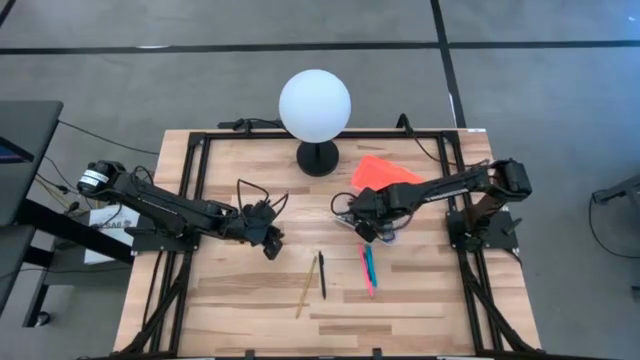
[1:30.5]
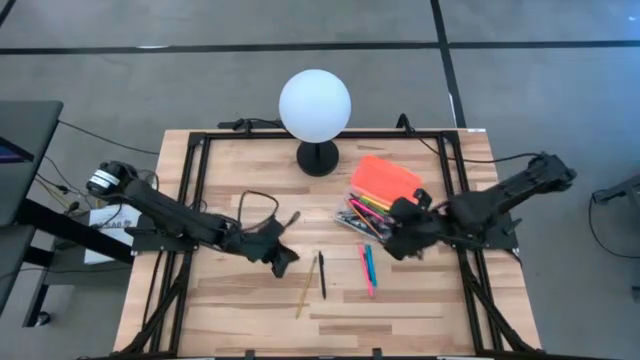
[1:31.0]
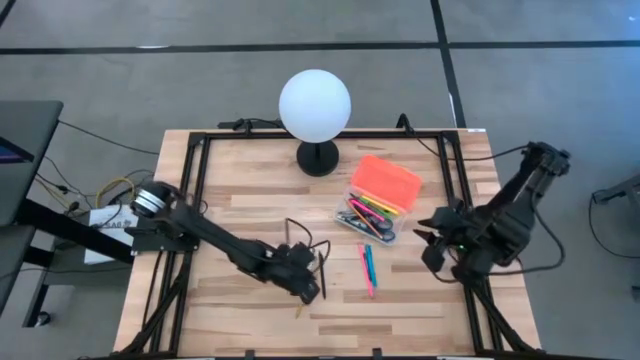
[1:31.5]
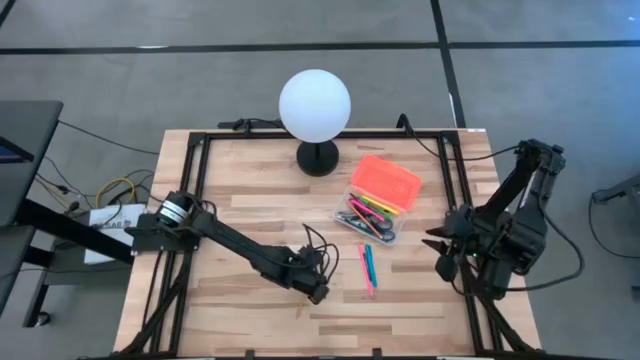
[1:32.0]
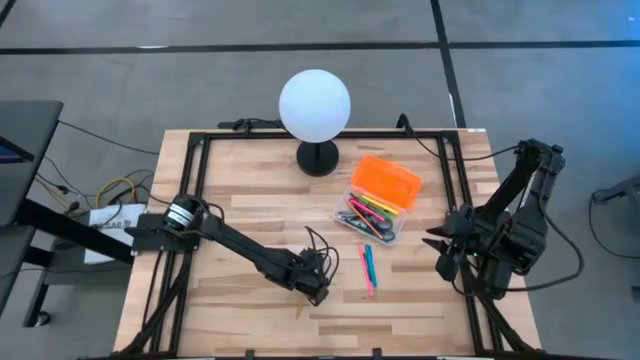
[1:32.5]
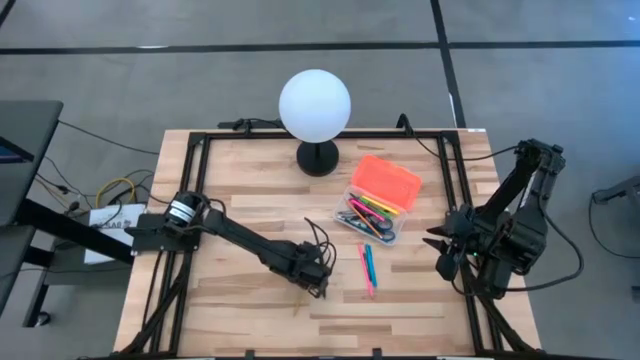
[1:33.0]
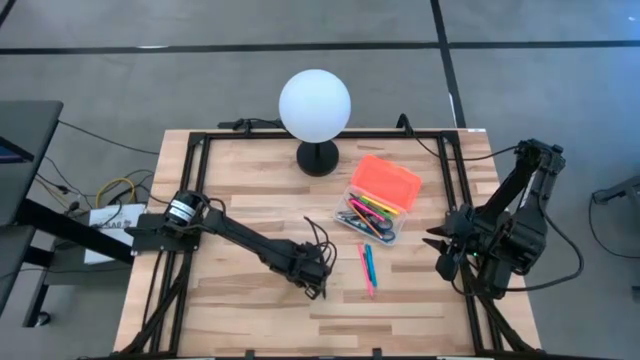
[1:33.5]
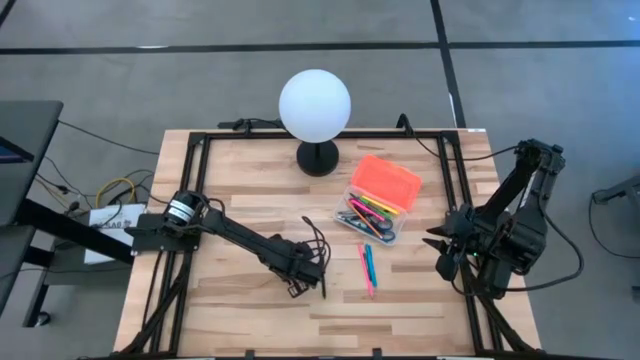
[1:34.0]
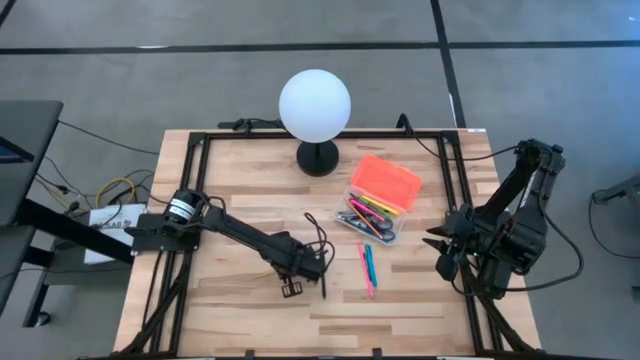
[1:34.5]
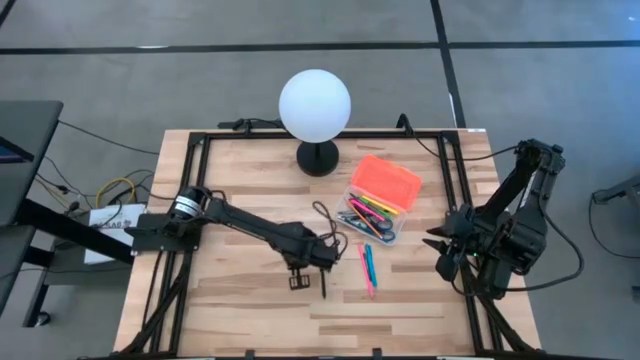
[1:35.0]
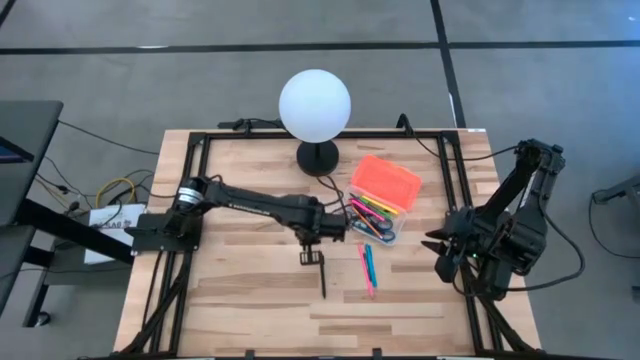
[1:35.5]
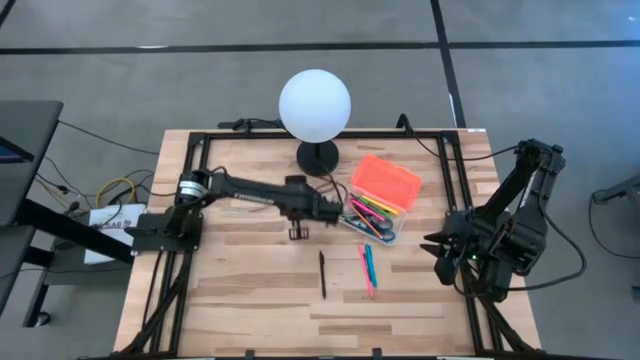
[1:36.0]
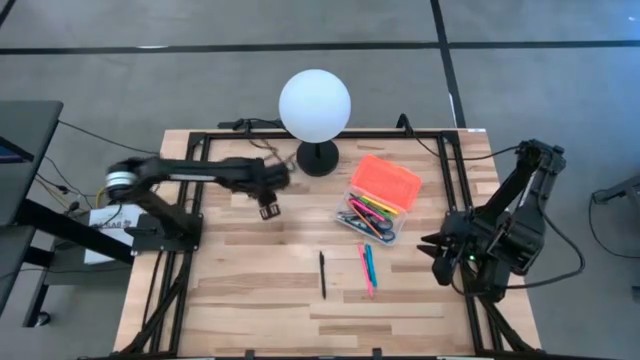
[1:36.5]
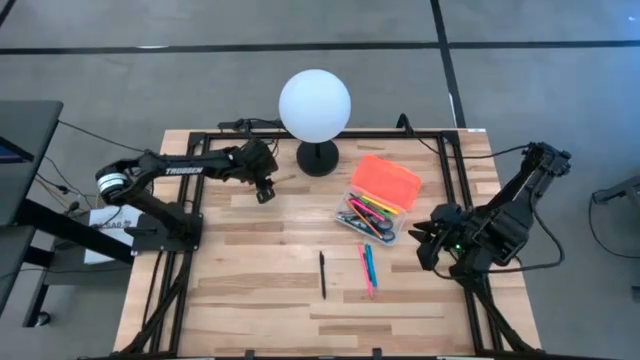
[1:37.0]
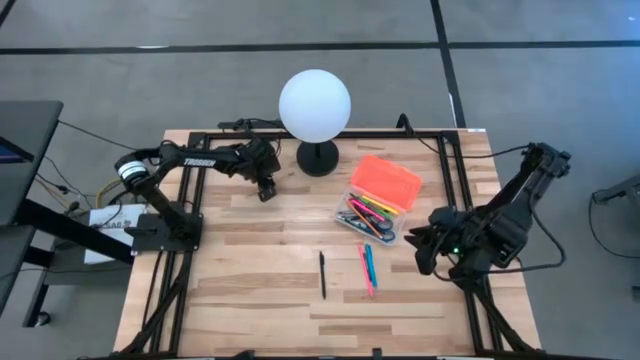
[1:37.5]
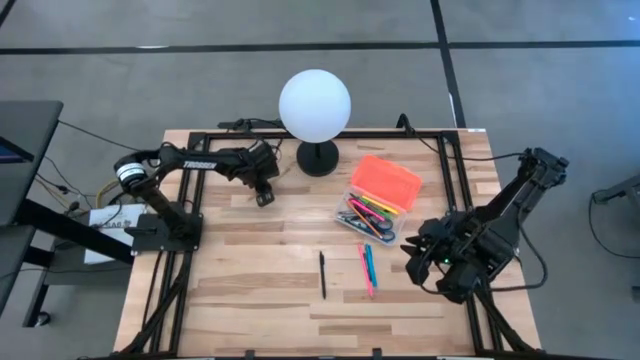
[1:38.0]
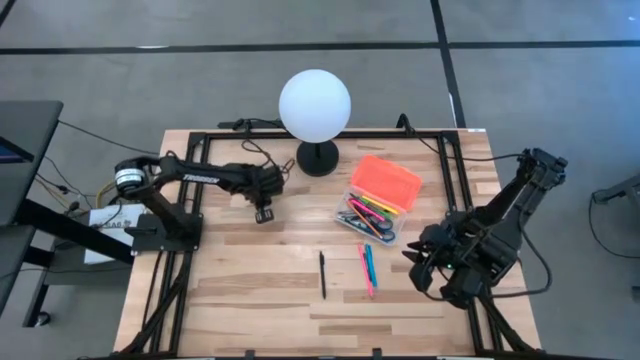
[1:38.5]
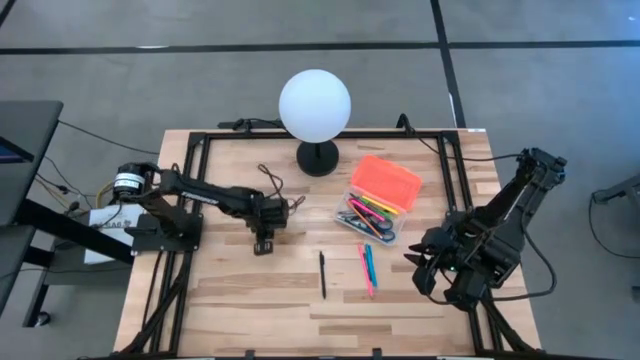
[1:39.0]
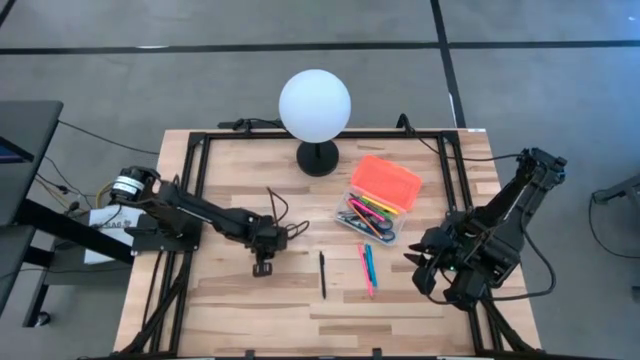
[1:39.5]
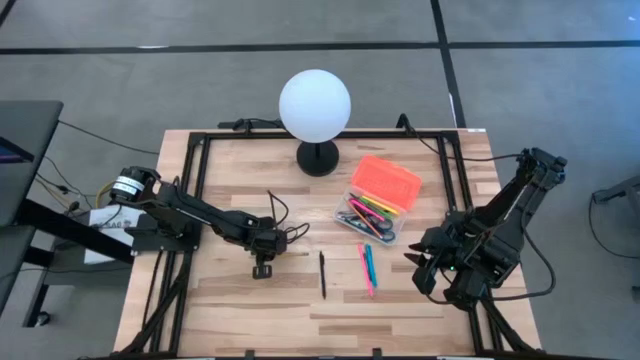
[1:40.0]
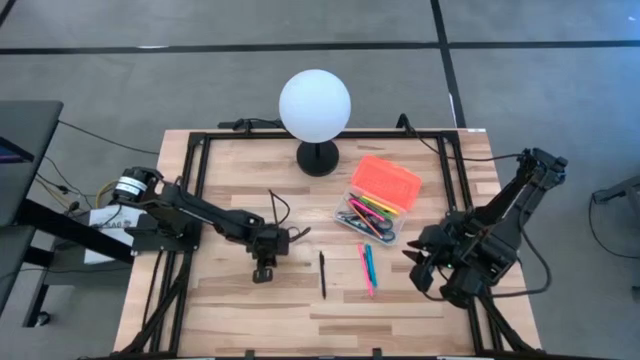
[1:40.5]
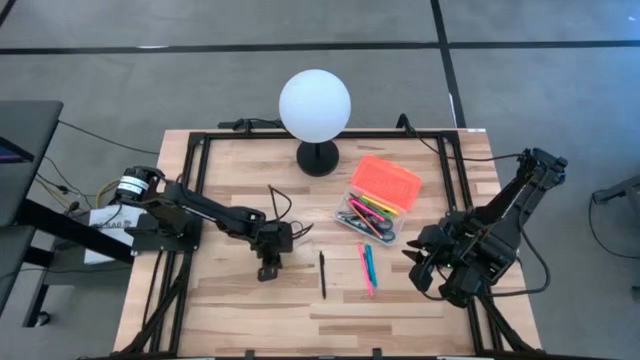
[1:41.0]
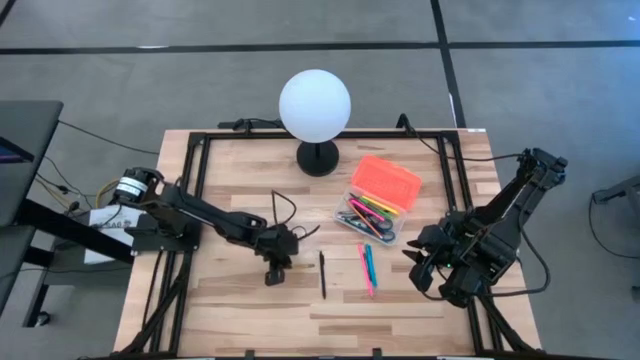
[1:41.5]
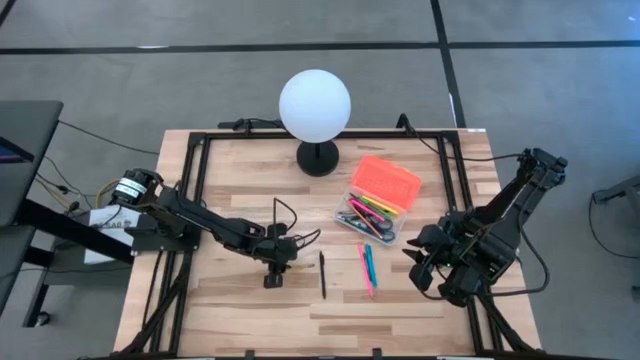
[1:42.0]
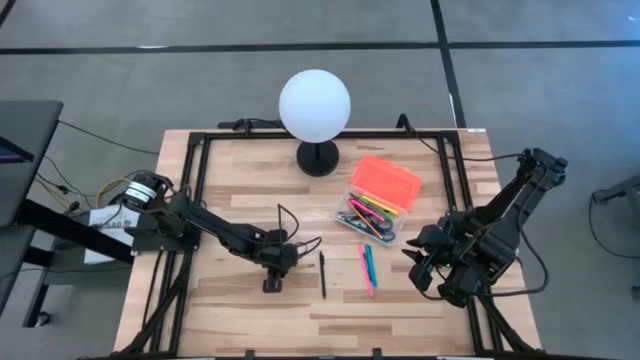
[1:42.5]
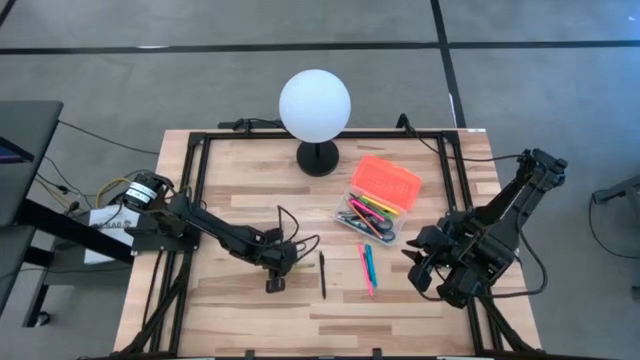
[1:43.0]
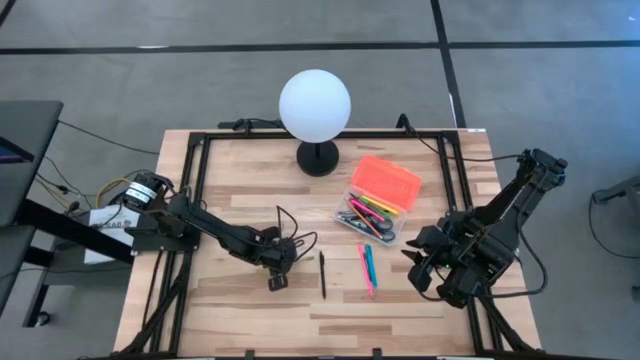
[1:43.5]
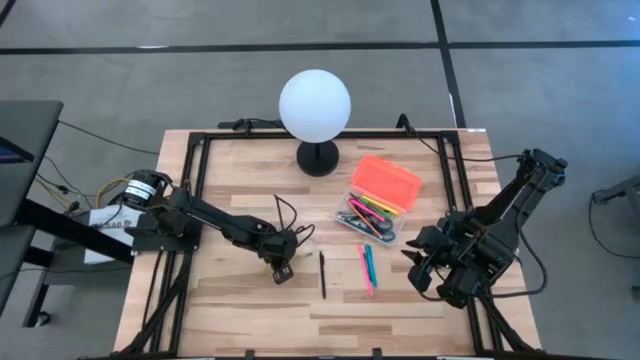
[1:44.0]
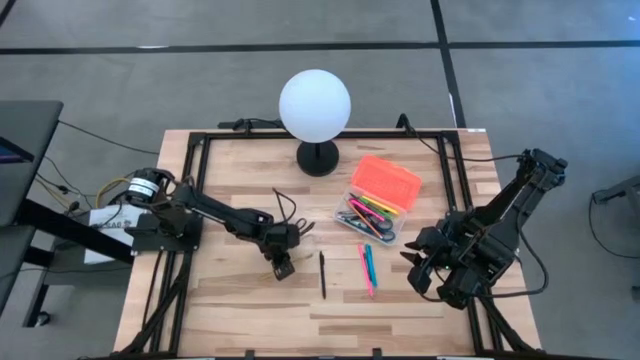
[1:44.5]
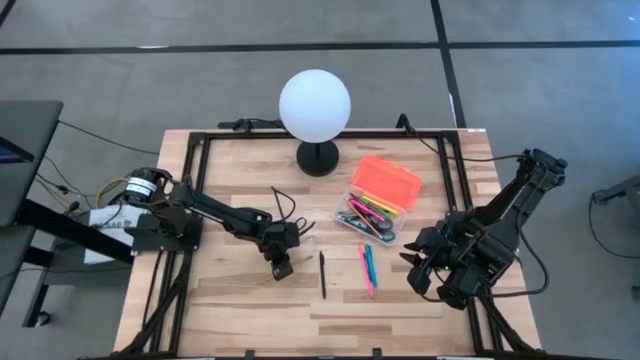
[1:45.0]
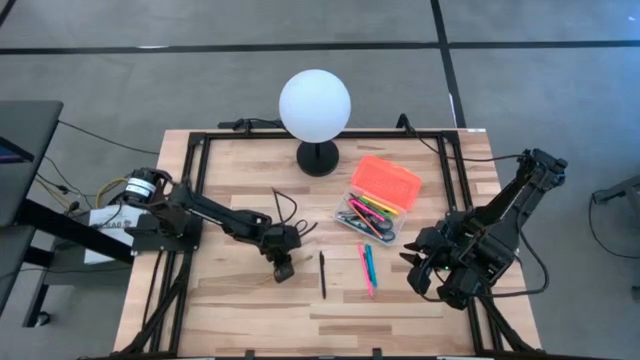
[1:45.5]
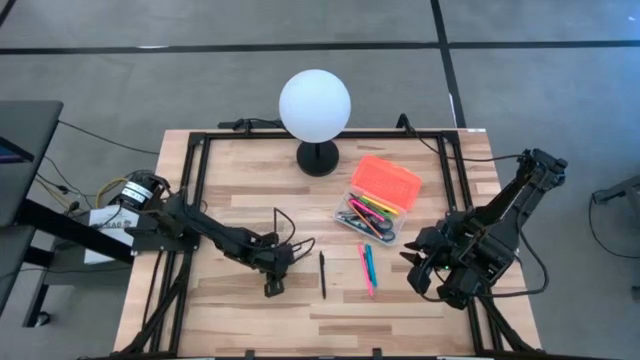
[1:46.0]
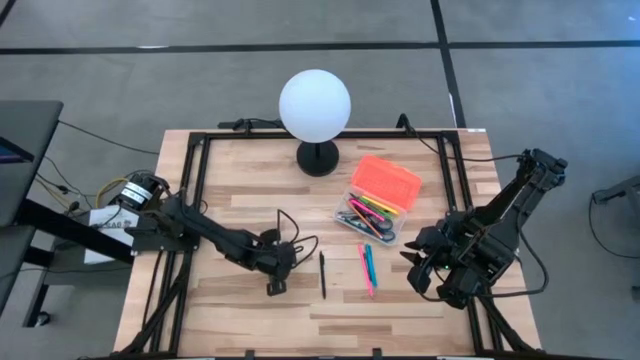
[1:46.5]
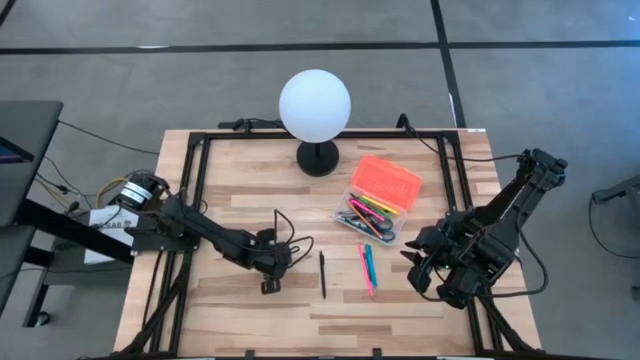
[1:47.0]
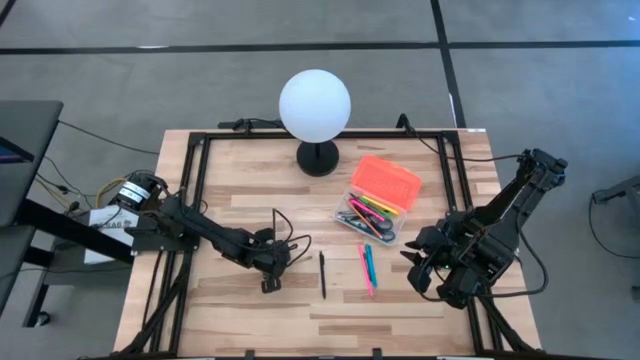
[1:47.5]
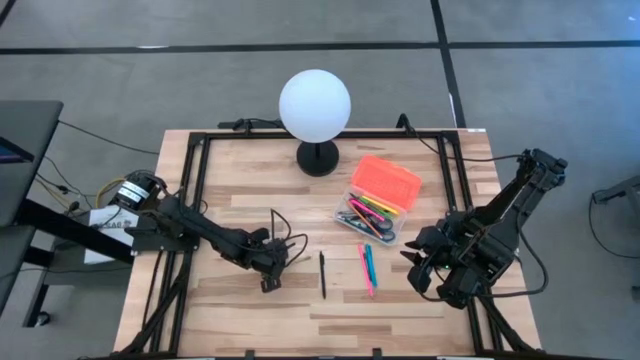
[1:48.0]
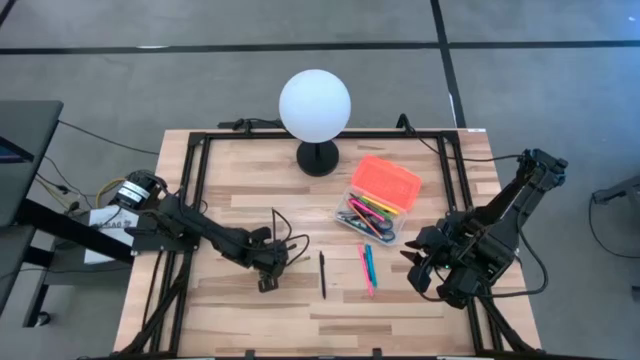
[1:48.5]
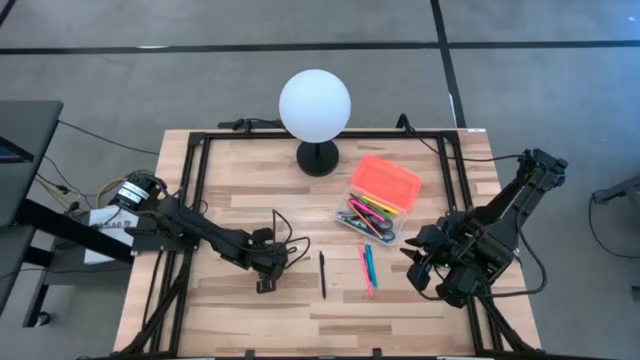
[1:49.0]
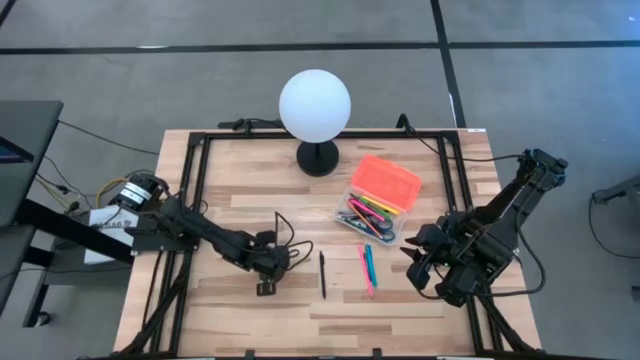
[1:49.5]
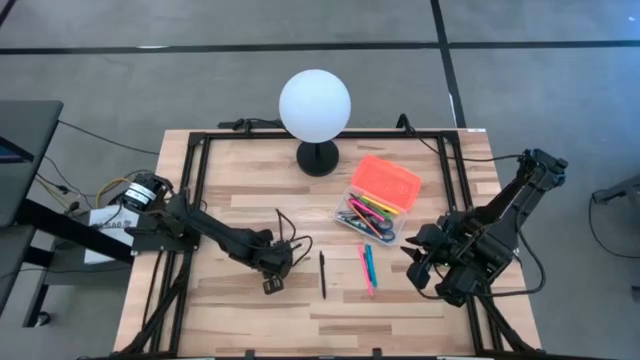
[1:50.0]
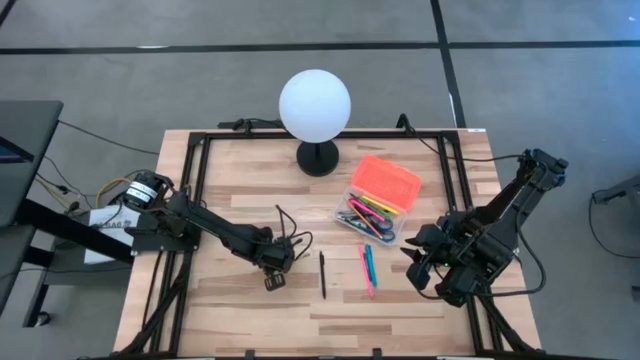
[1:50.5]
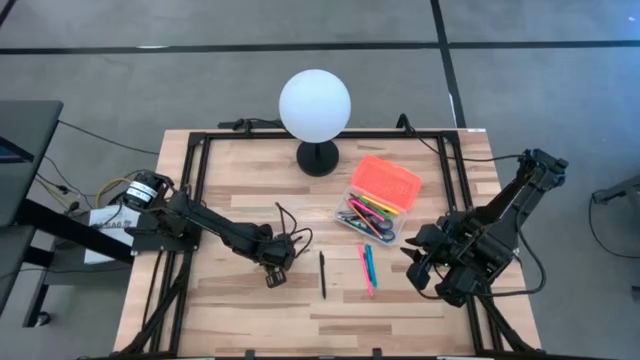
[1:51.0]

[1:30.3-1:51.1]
Task: Pick & place school supplies into a supply box
Put the yellow pencil into the orange supply box
